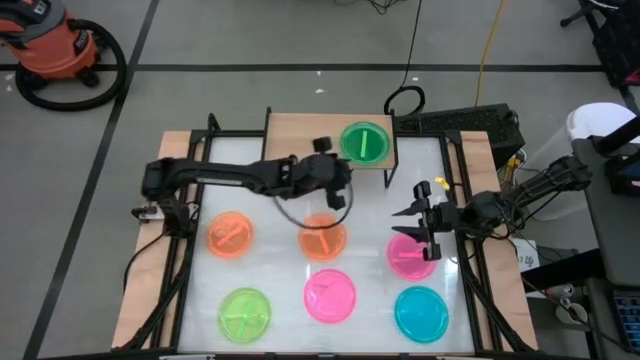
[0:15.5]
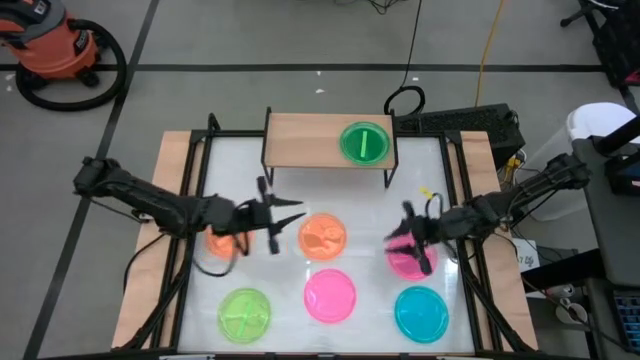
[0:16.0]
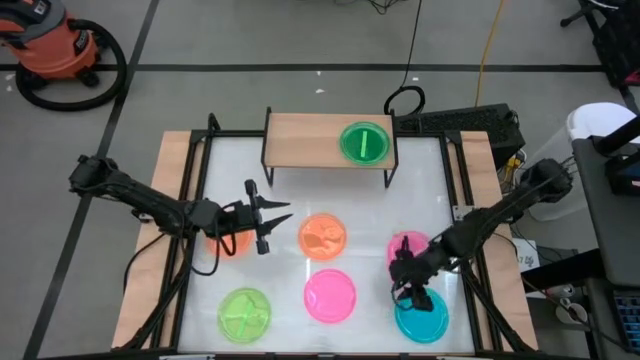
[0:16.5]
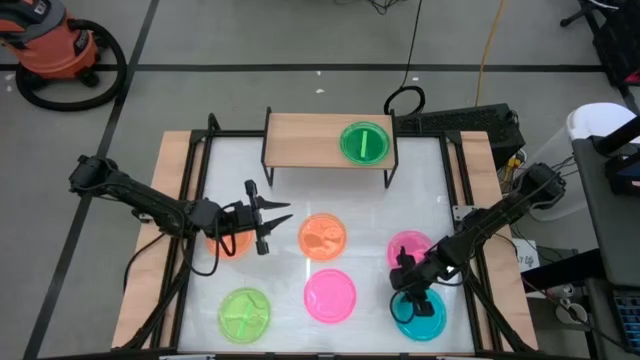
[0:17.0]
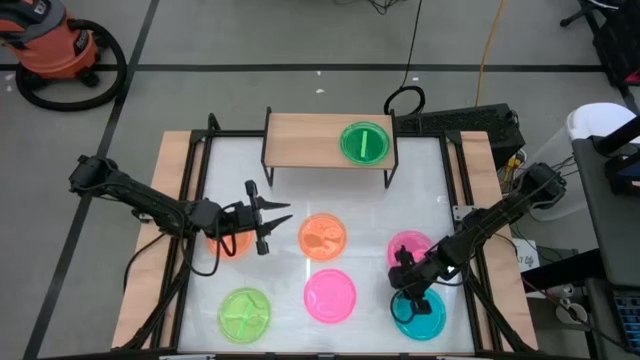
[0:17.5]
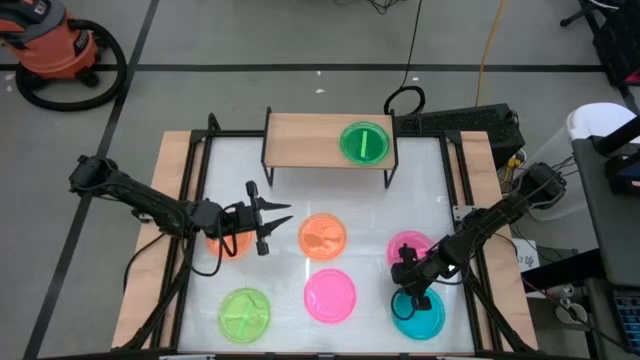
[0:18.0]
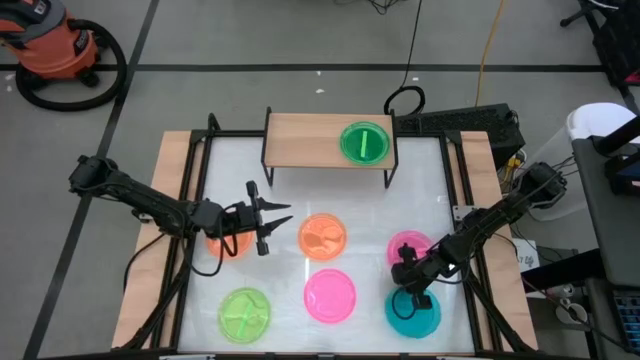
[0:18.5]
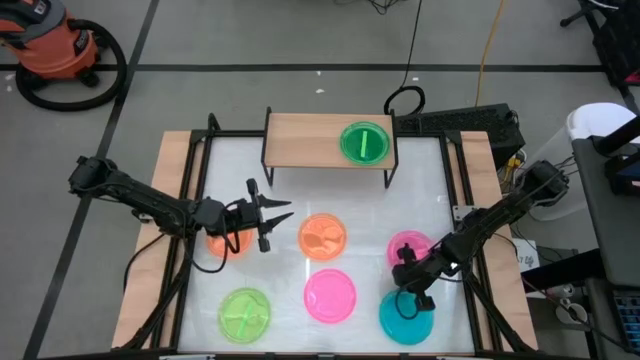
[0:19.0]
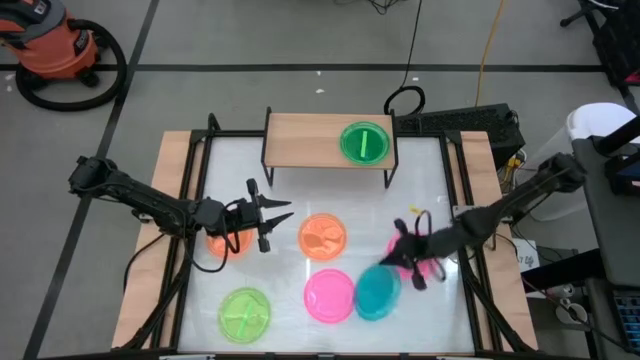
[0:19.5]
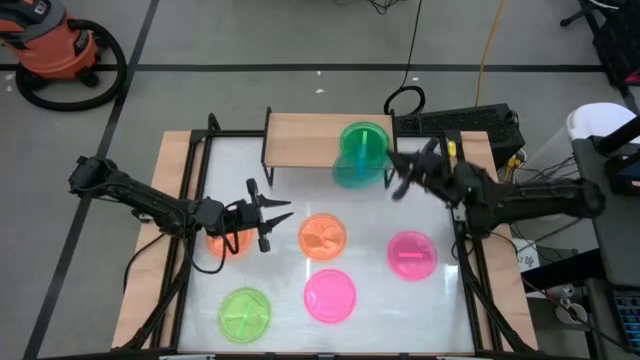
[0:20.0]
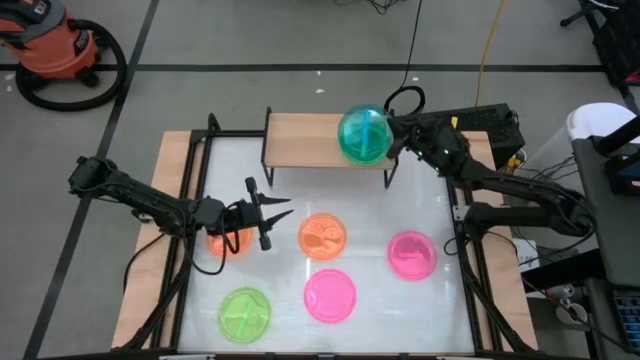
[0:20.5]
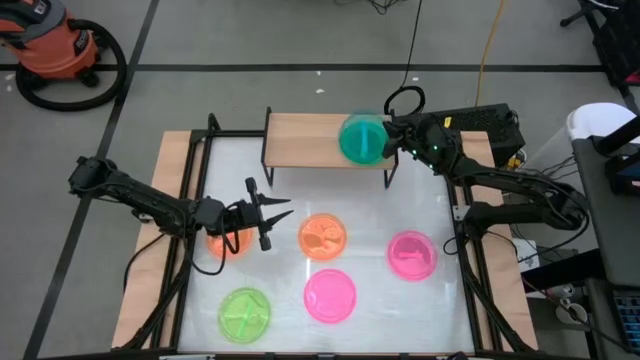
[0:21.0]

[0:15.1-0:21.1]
Task: Place and stack plates onto a shelf
Stack the blue plate on top of the green plate on the shelf

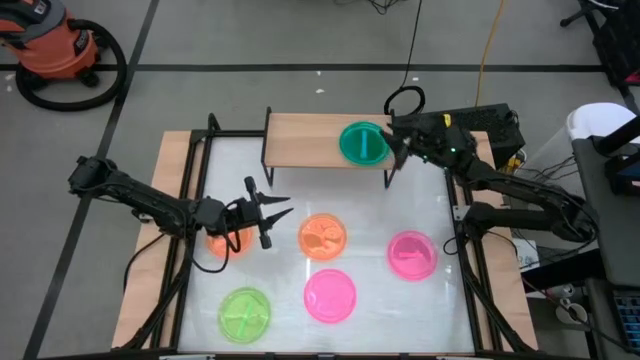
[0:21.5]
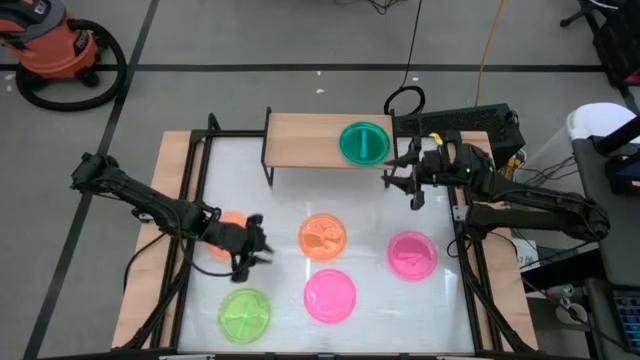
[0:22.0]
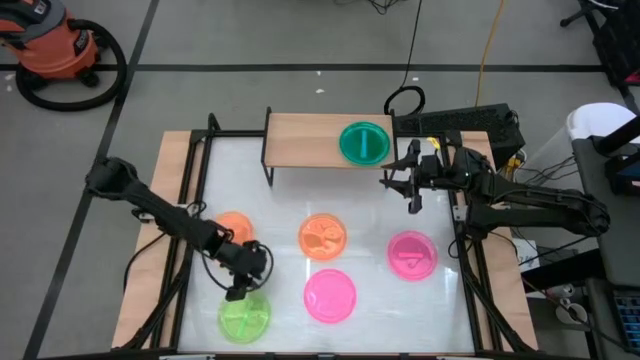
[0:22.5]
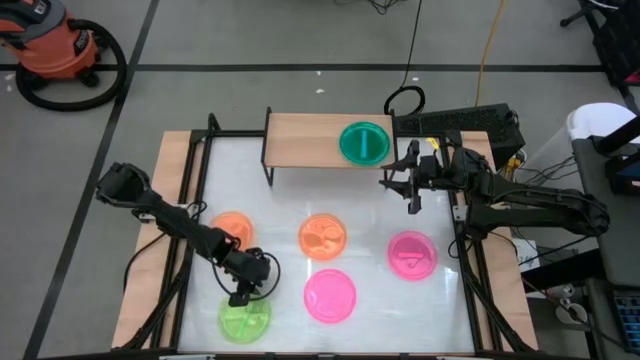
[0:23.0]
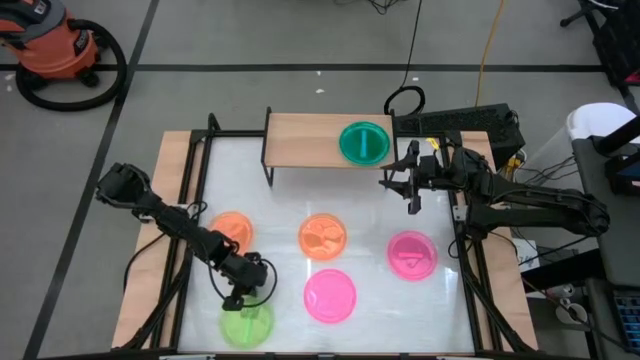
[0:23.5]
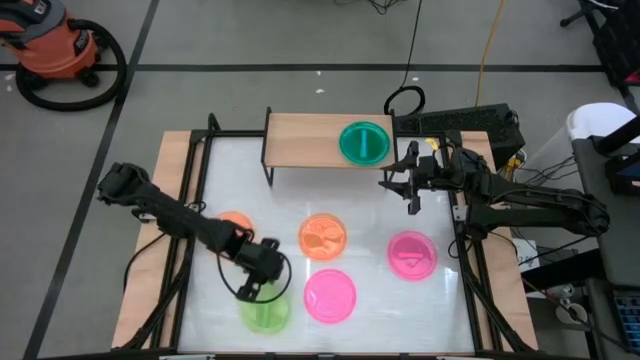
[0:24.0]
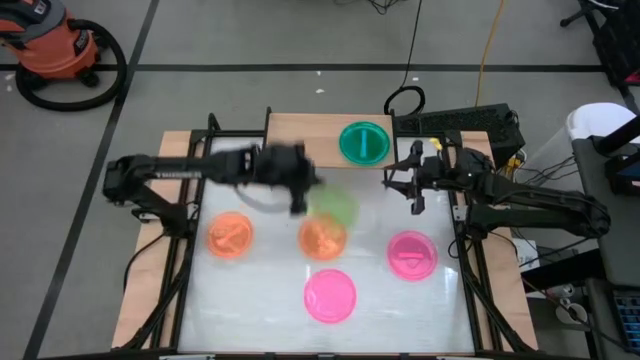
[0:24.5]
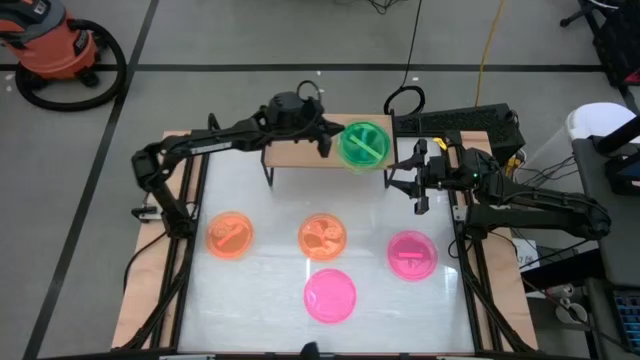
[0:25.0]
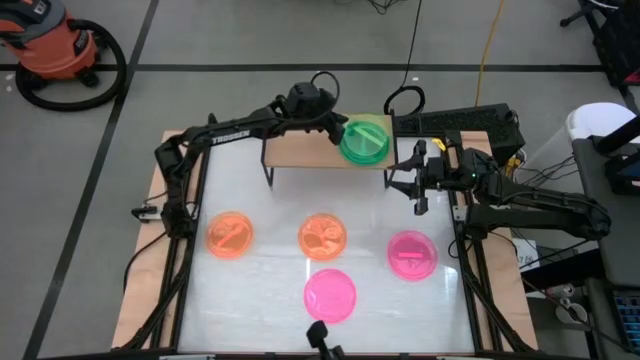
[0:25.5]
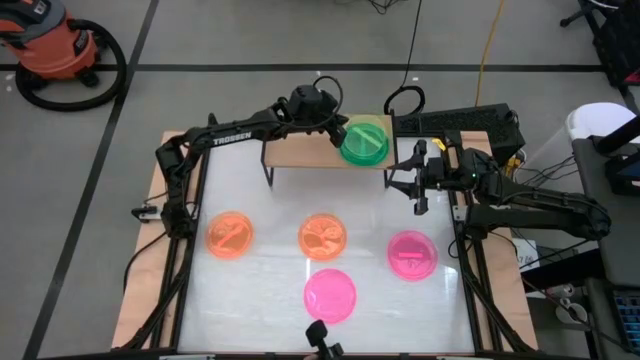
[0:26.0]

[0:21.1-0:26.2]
Stack the green plate on top of the blue plate on the shelf

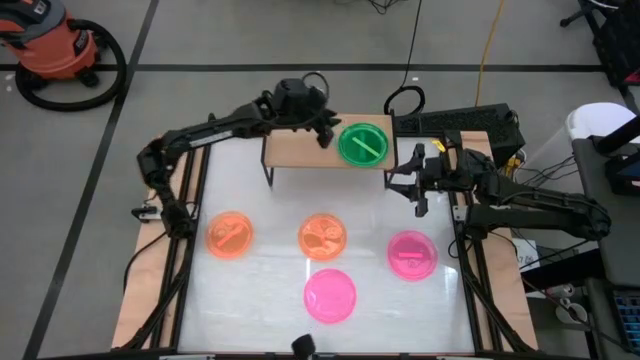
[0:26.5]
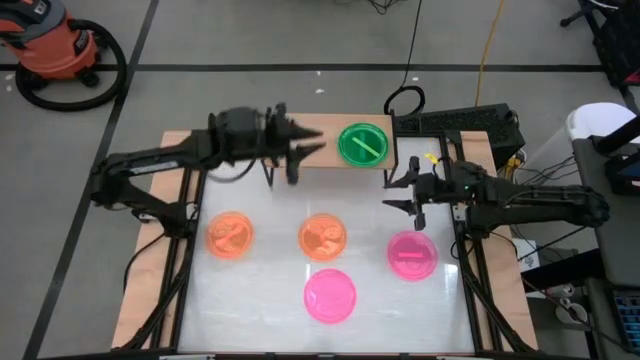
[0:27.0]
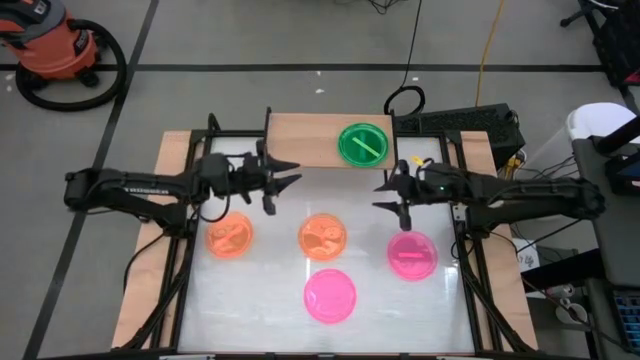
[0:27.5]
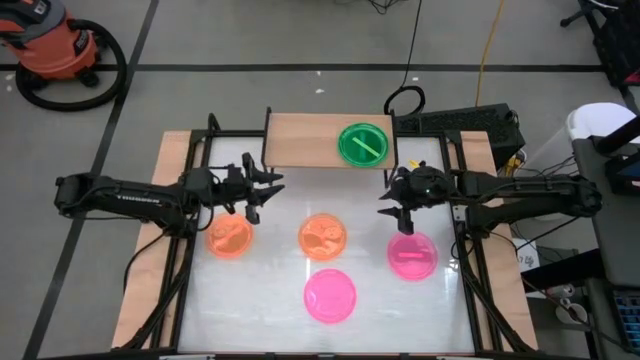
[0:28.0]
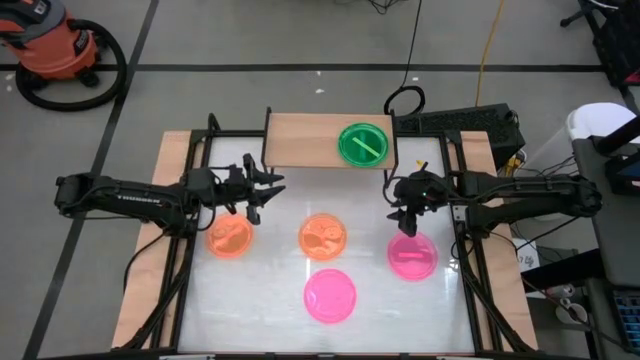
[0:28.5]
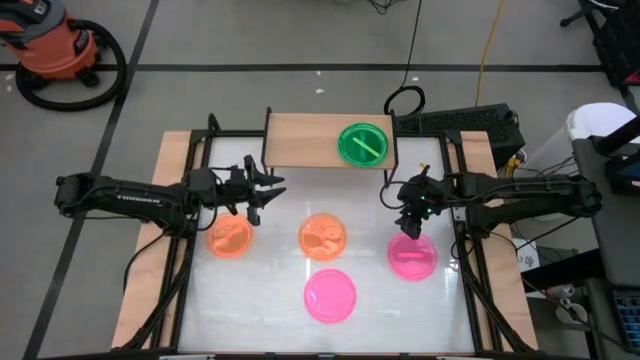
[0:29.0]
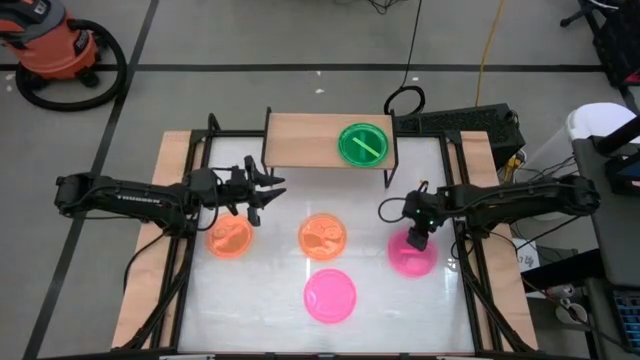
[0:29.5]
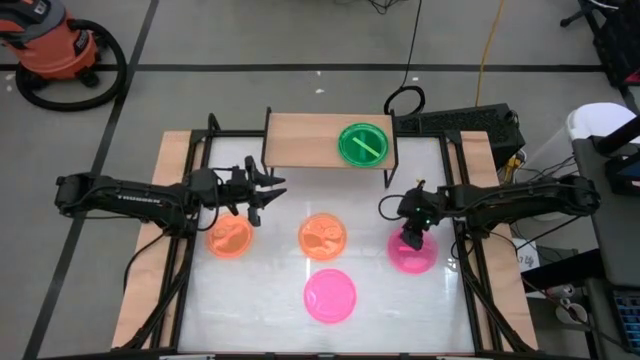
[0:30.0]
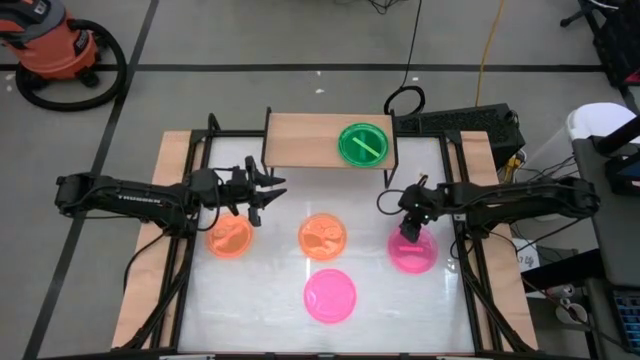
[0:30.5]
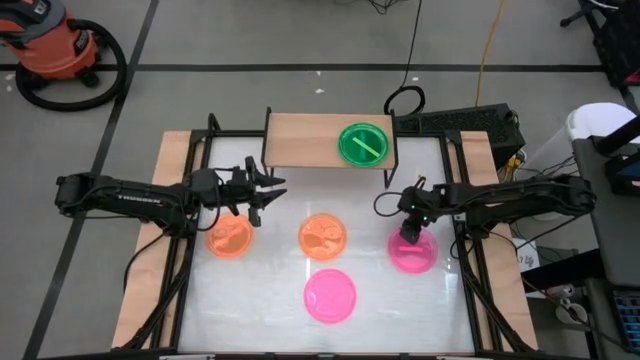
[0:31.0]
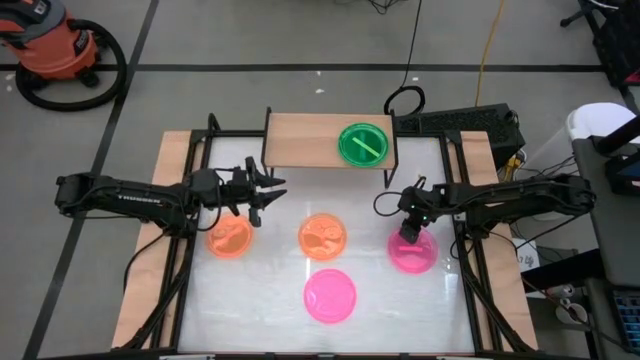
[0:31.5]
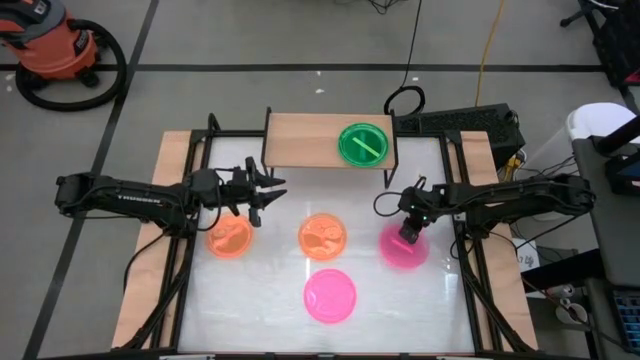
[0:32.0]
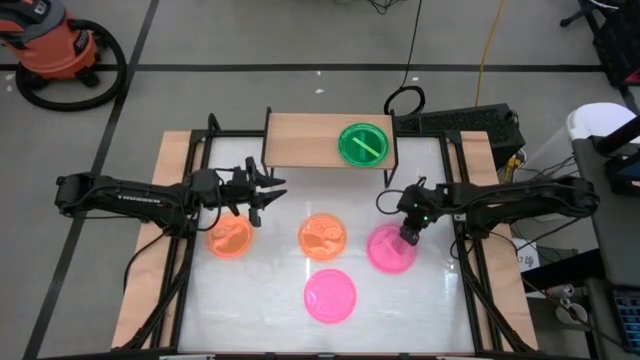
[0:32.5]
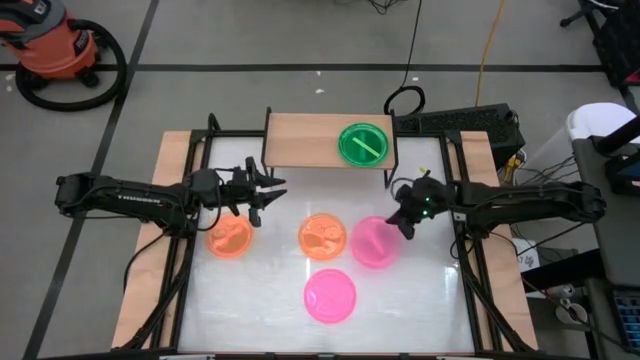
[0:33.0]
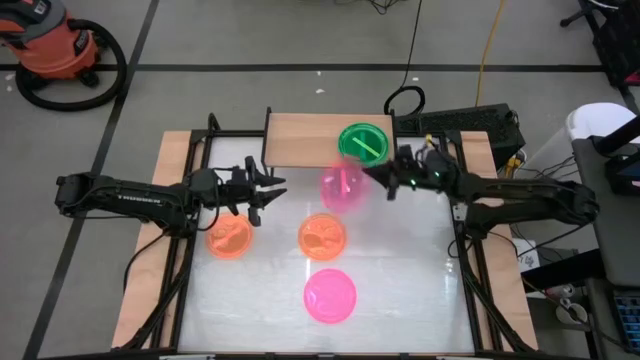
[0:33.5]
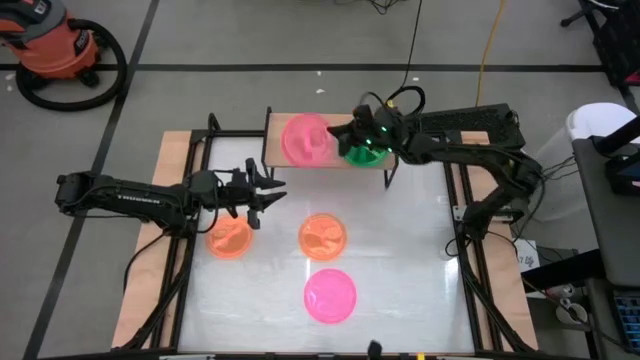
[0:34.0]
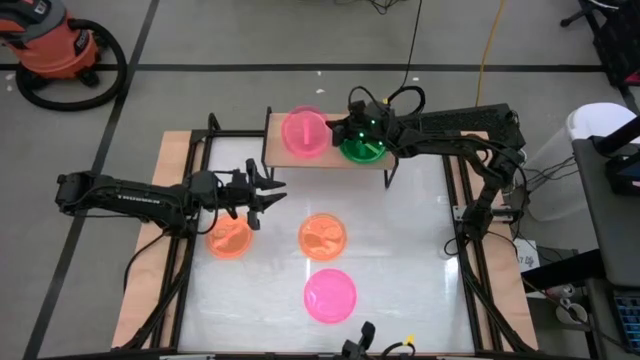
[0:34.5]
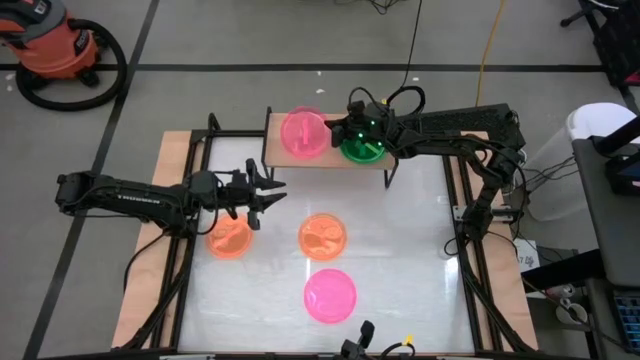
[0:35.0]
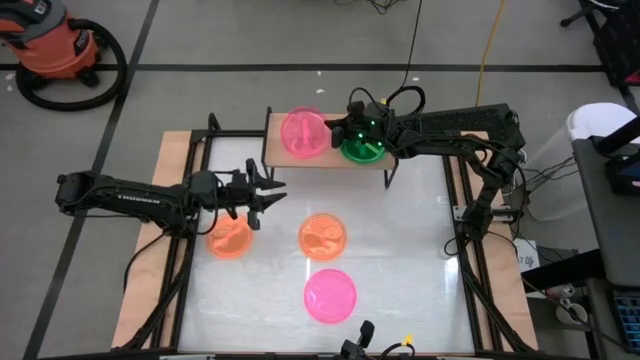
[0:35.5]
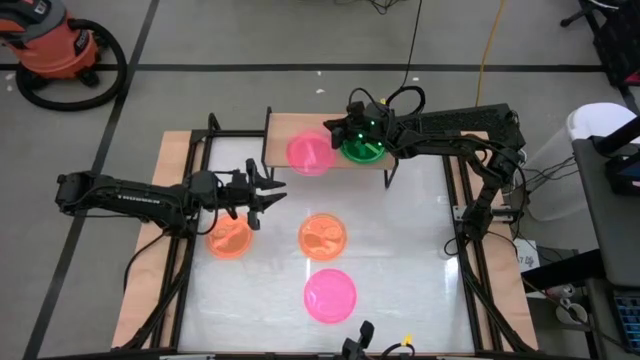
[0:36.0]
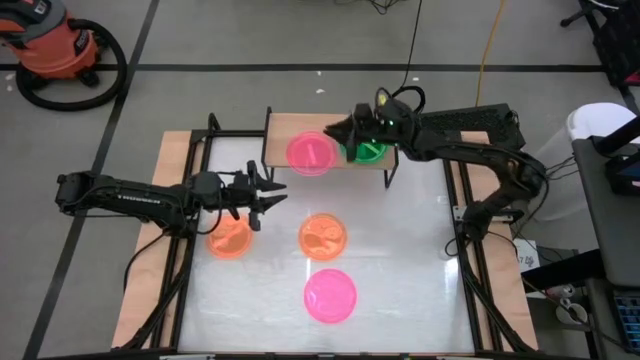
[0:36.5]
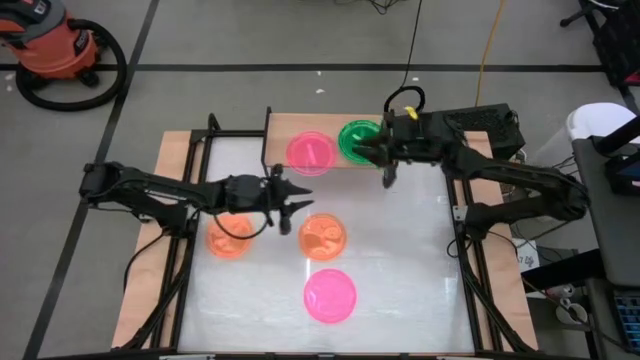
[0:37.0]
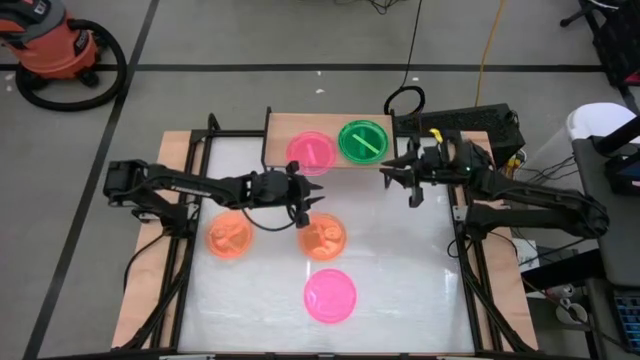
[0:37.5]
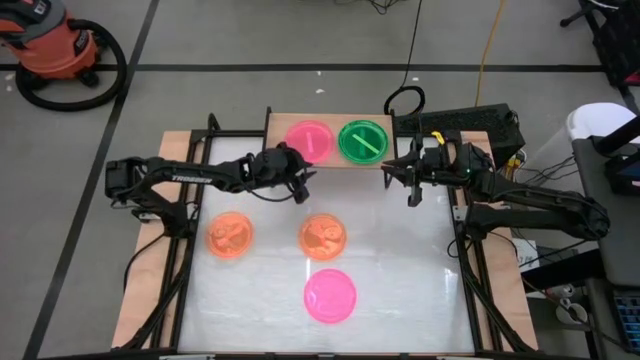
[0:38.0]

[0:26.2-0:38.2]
Put the top pink plate on the shelf
